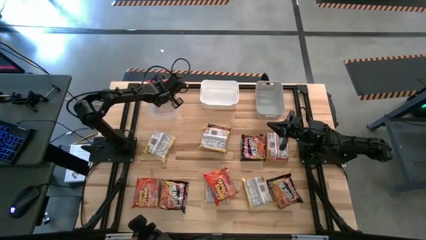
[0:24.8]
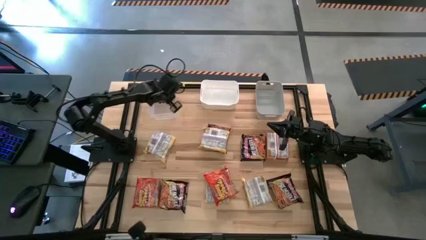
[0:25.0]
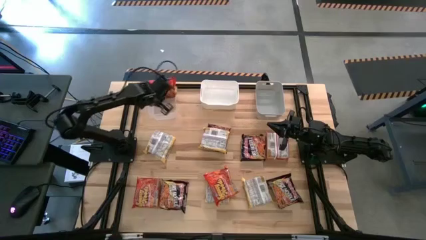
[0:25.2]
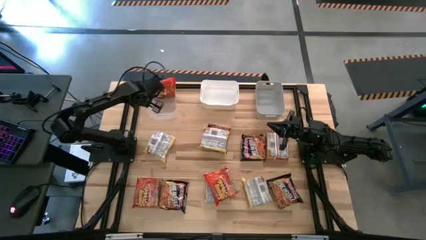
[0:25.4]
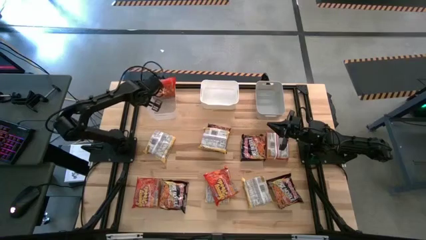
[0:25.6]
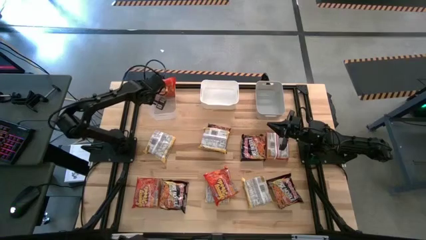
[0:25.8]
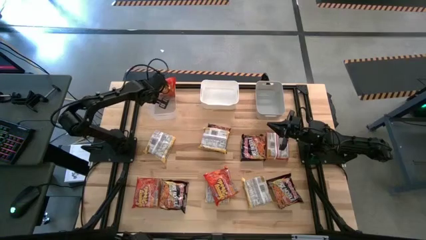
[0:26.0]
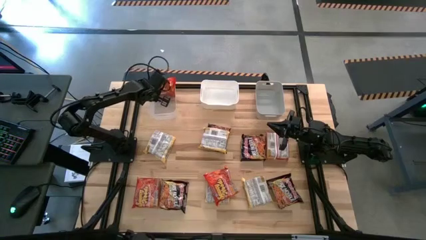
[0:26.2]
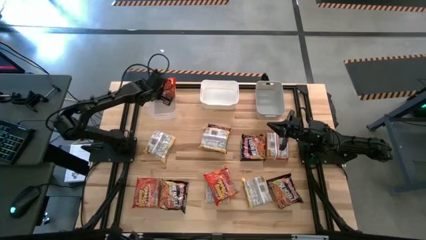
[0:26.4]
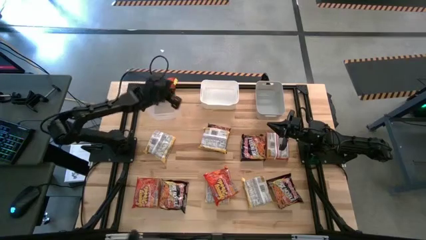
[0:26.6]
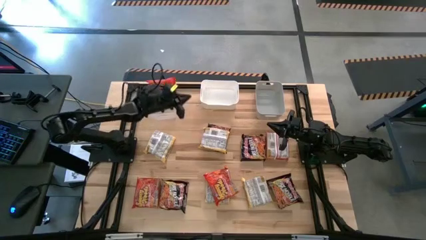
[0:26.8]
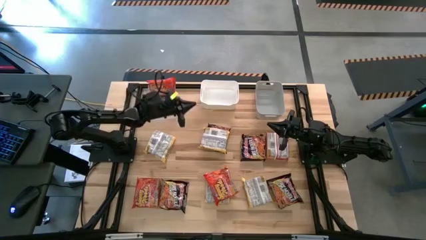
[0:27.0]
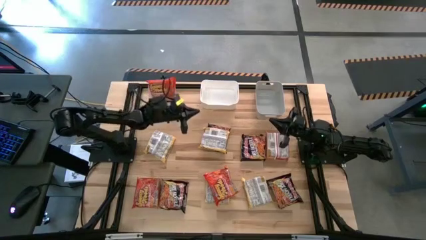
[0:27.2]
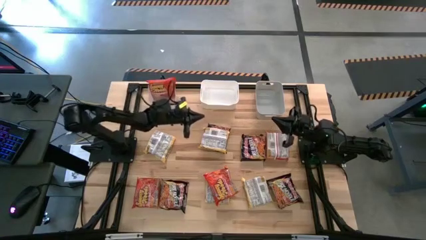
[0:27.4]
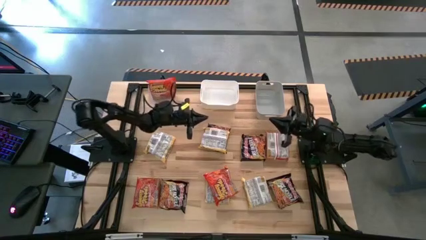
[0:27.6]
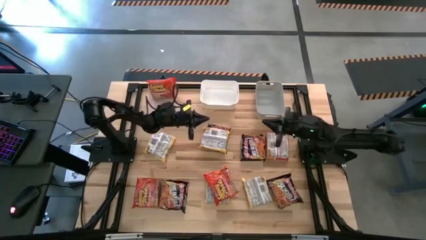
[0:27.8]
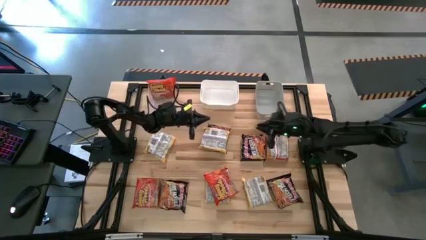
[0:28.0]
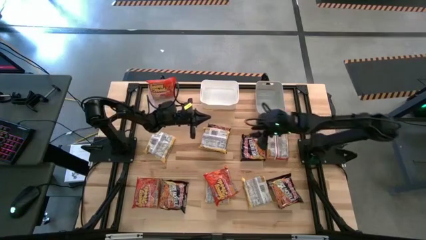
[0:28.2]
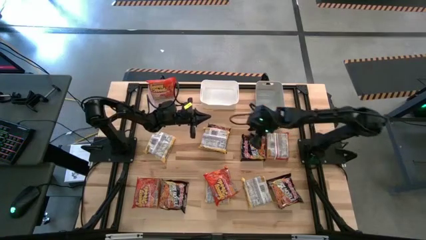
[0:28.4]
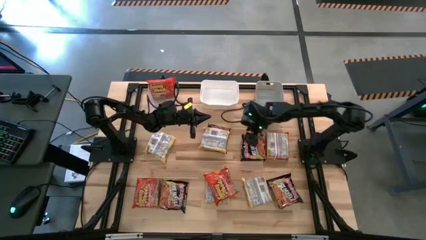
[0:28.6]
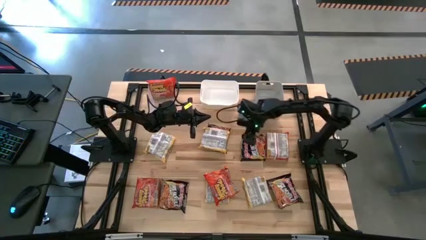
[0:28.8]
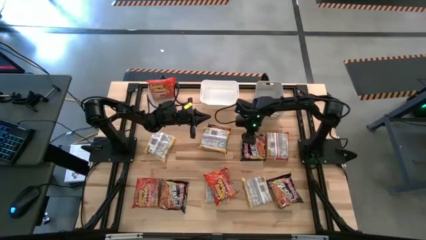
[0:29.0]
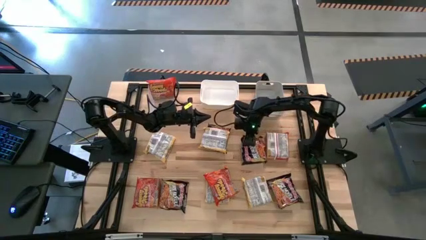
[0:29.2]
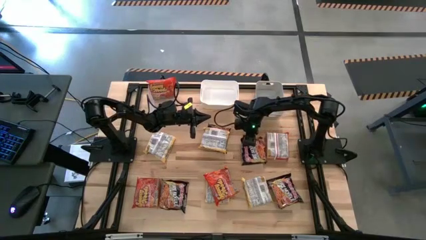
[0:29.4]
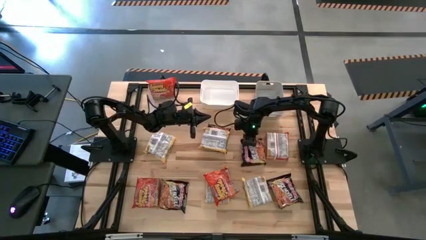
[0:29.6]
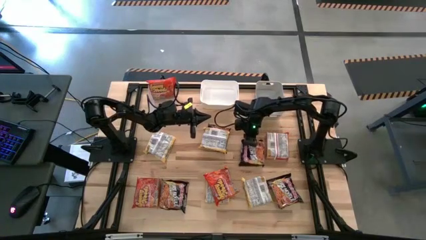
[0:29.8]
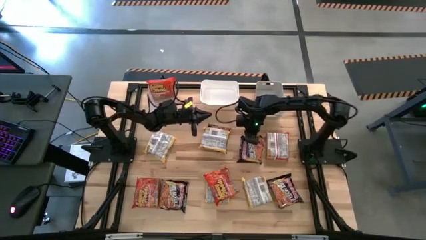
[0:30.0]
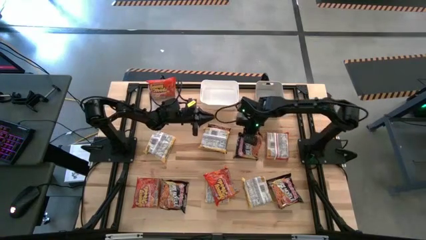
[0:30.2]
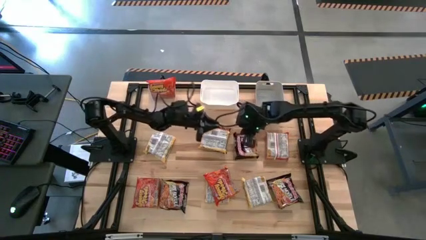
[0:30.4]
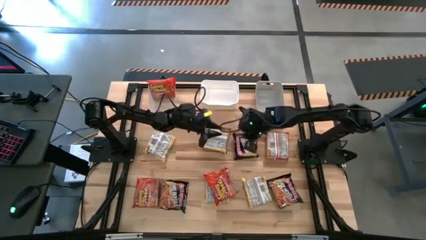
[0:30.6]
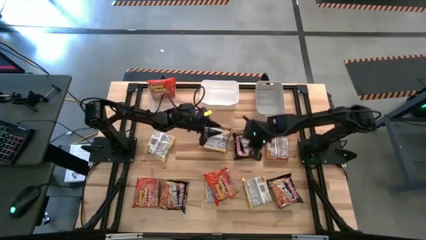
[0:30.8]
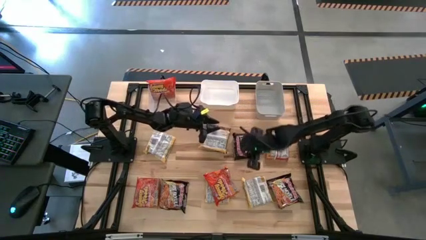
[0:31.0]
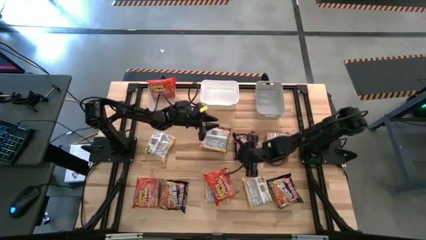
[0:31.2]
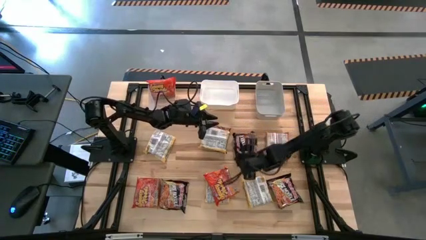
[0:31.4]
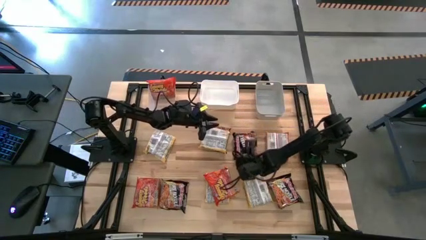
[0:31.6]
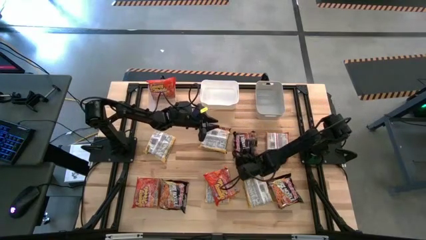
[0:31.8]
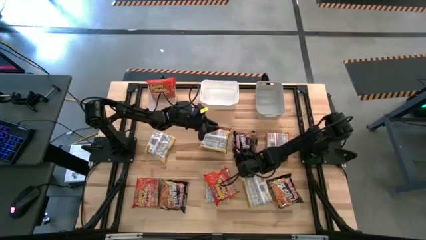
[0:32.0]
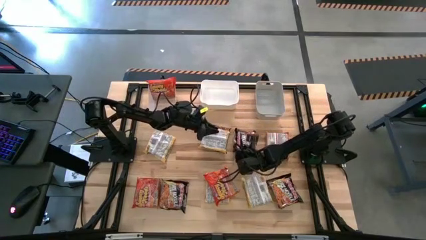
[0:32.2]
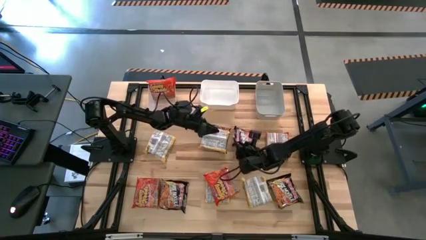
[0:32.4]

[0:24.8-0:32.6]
Task: Sort Maruchan noodles
Put the black noodle pack into the white bin

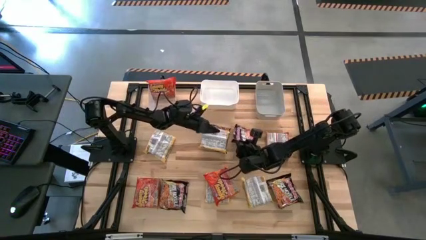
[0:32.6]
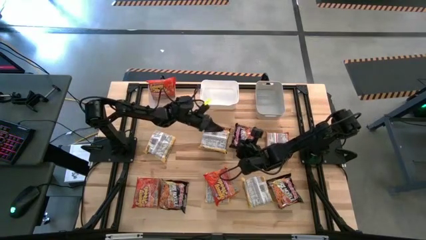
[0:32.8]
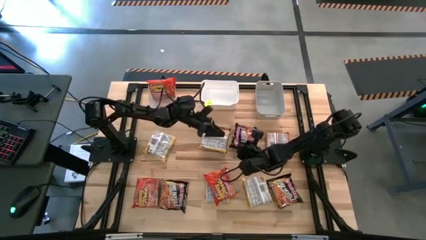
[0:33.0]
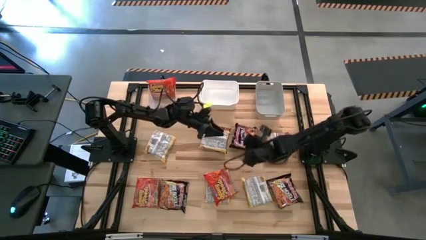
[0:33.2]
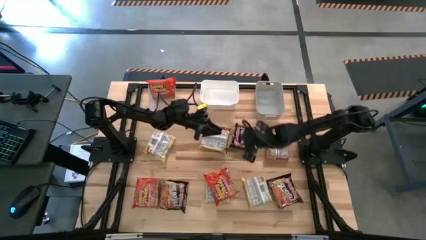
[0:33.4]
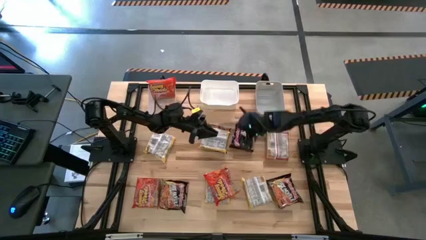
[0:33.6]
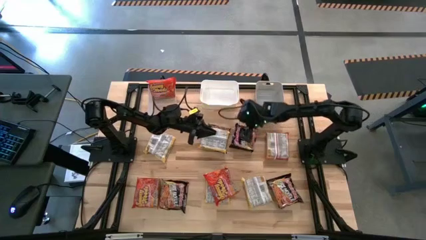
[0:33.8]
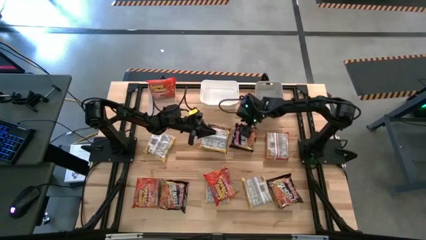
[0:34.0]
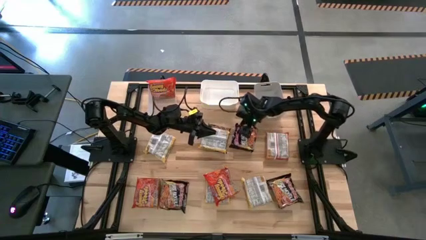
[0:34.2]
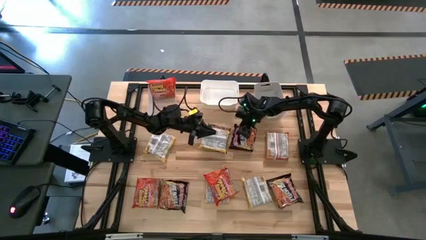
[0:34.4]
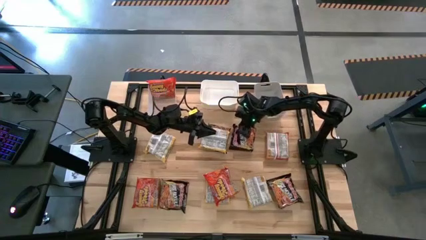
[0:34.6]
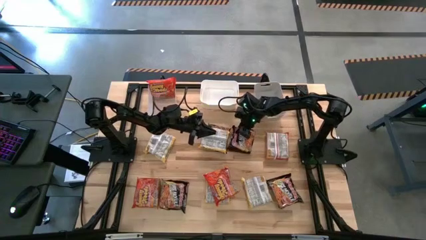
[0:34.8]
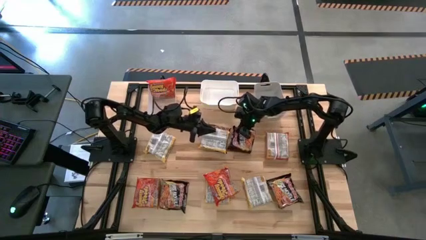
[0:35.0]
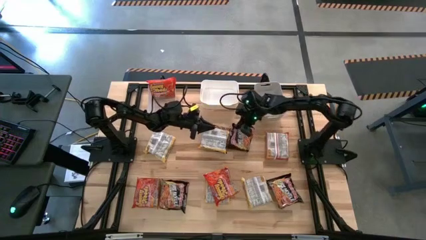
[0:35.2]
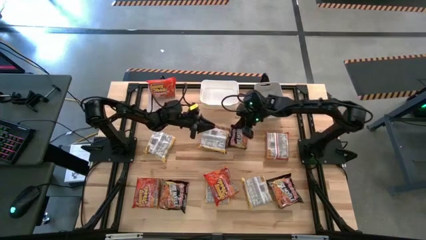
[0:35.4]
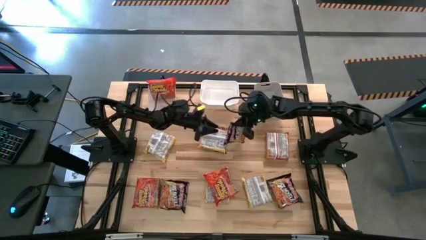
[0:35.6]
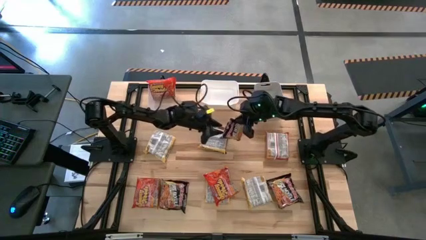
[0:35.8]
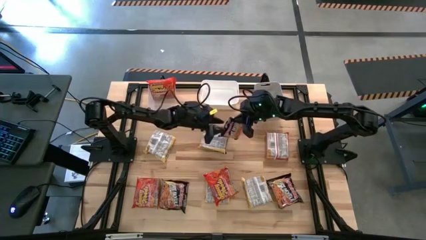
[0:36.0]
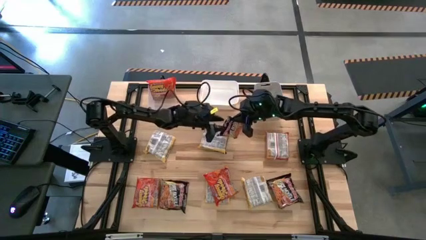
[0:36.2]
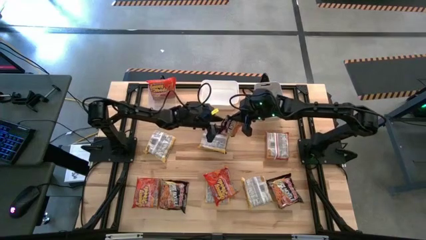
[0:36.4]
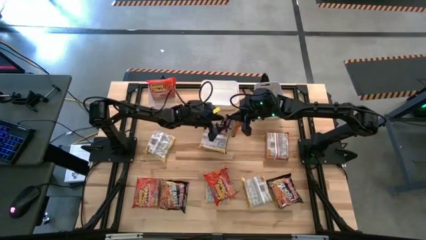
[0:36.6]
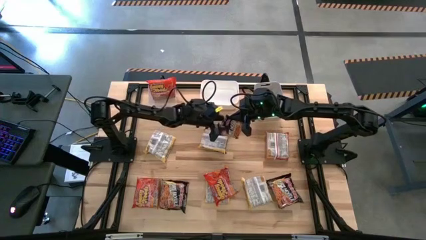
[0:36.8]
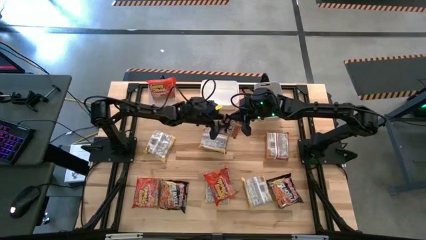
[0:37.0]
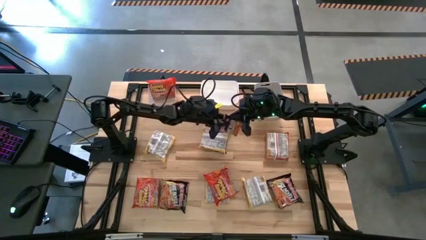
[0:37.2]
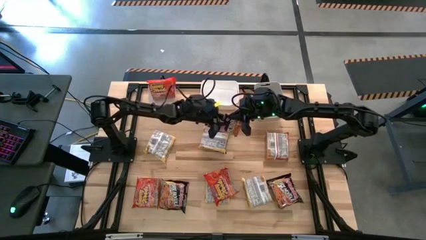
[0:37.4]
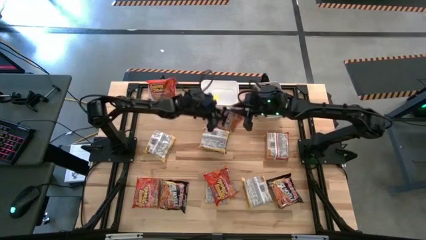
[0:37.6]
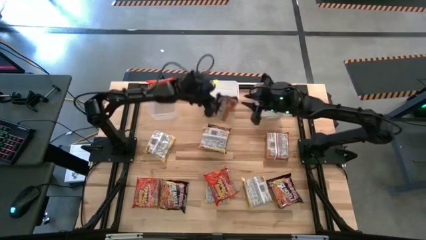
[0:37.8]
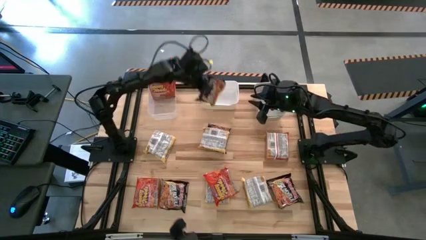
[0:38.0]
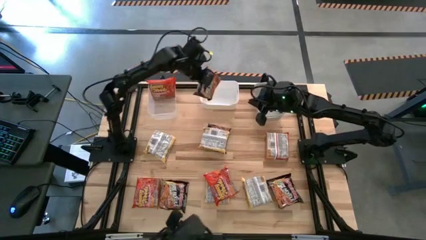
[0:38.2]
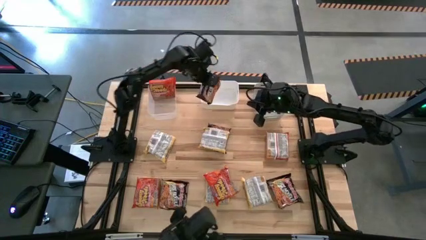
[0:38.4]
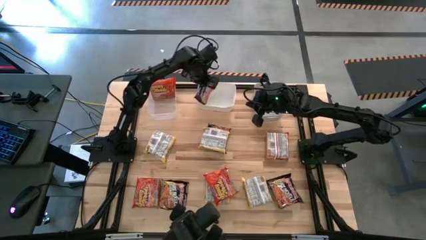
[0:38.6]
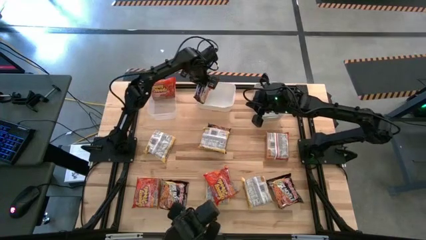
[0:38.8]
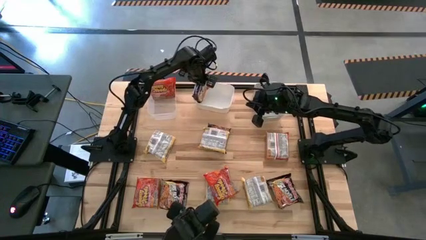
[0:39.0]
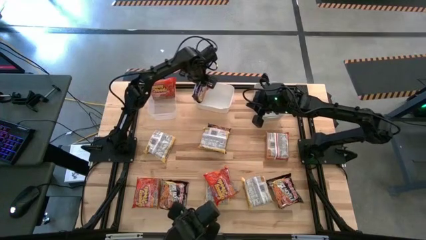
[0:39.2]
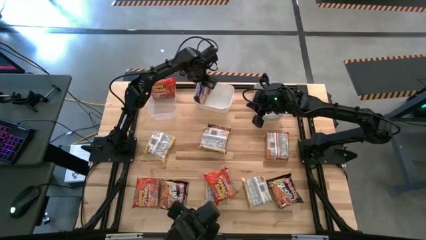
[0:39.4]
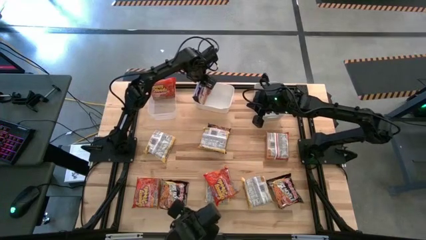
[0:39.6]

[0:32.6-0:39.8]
Put the black noodle pack into the white bin
